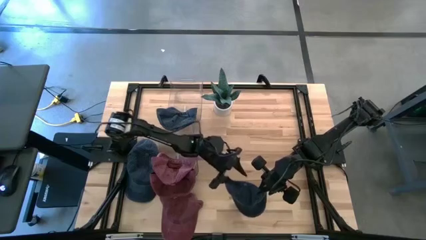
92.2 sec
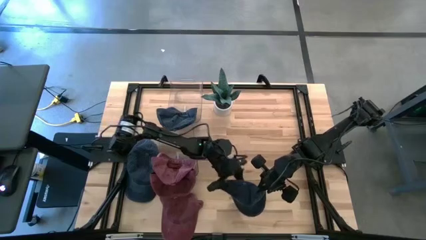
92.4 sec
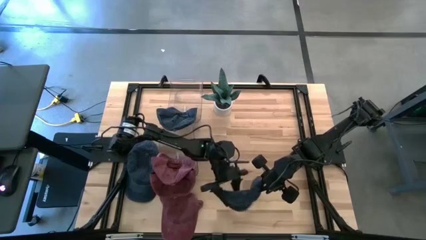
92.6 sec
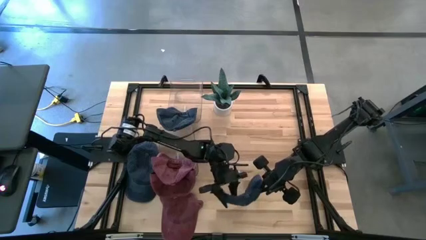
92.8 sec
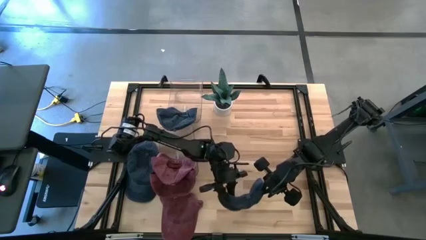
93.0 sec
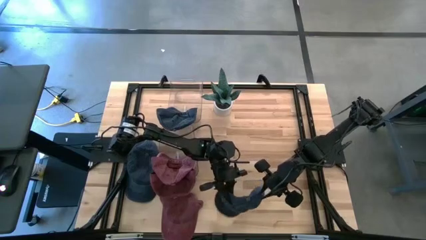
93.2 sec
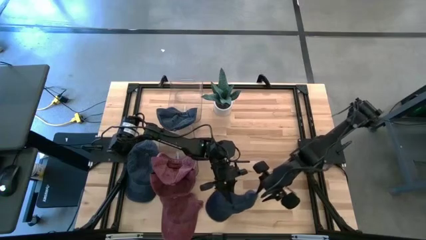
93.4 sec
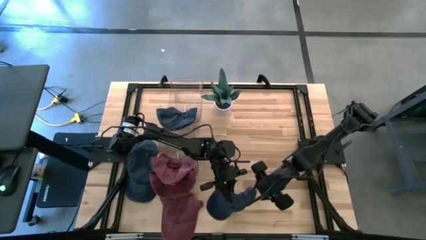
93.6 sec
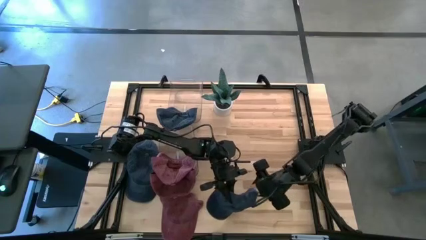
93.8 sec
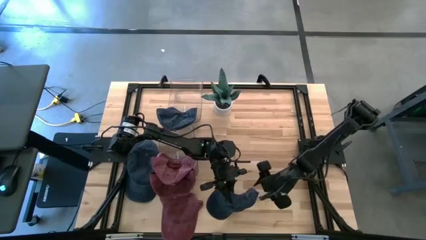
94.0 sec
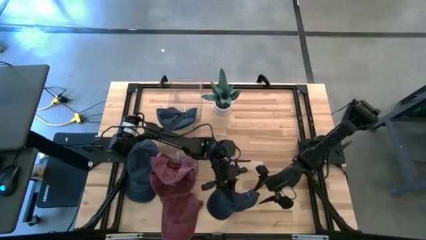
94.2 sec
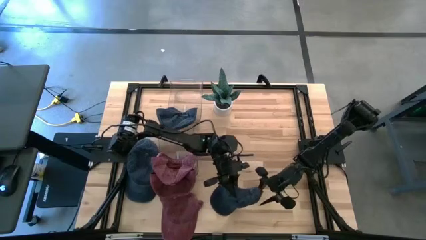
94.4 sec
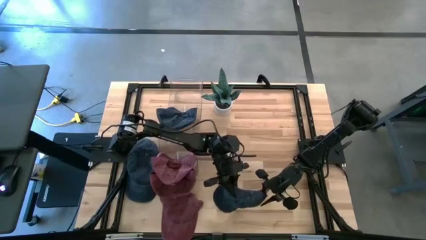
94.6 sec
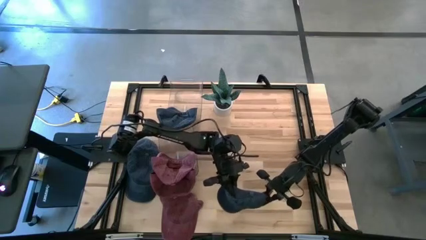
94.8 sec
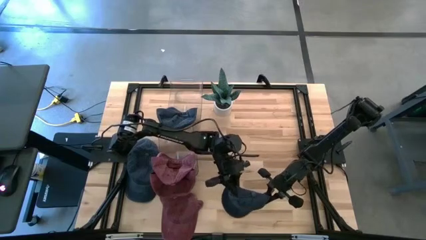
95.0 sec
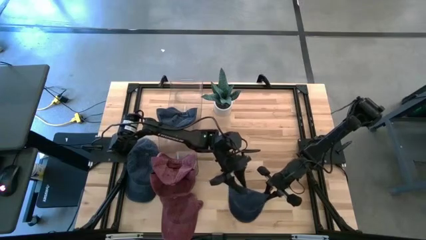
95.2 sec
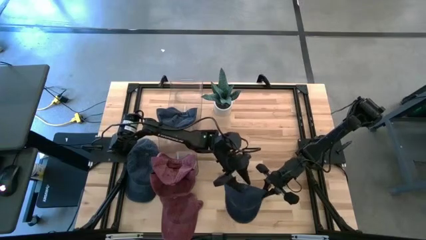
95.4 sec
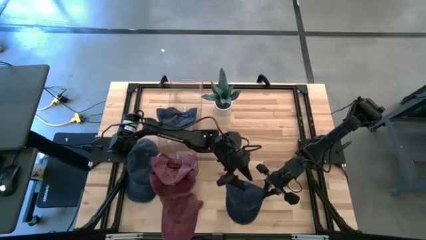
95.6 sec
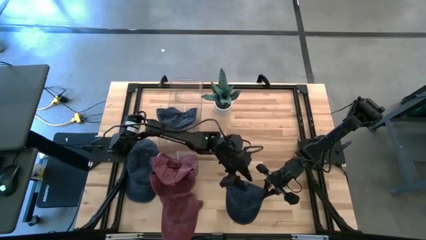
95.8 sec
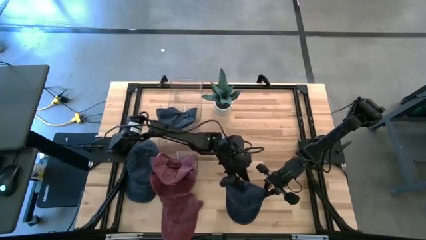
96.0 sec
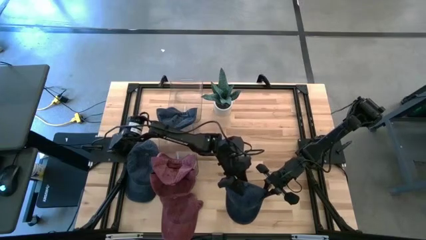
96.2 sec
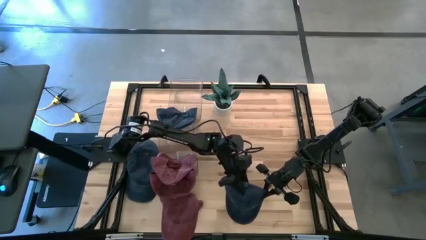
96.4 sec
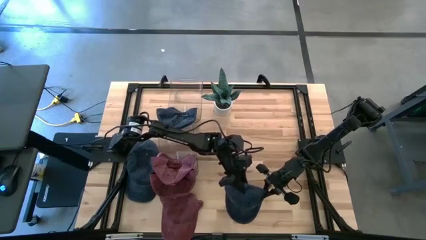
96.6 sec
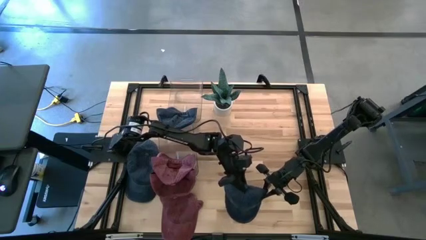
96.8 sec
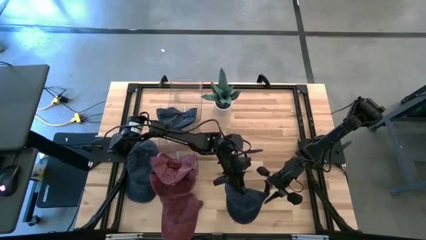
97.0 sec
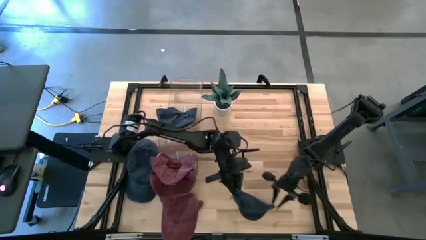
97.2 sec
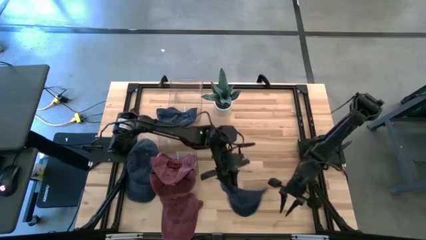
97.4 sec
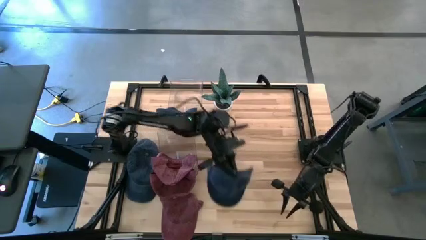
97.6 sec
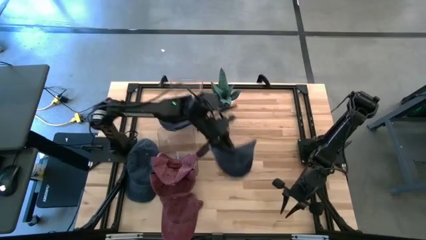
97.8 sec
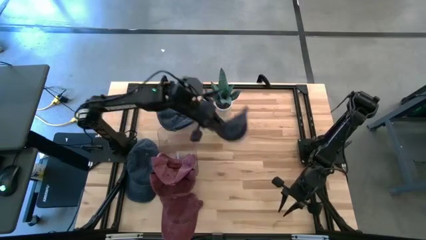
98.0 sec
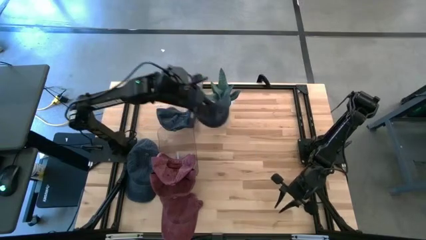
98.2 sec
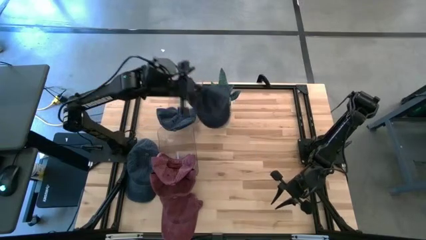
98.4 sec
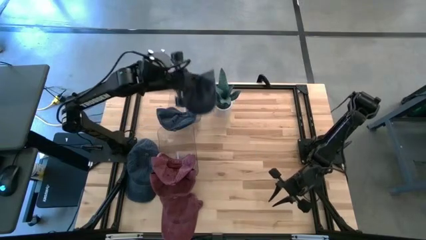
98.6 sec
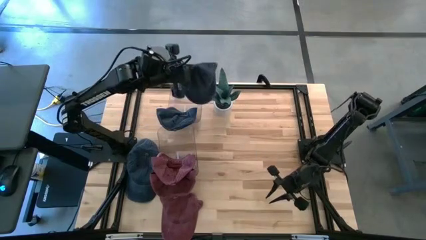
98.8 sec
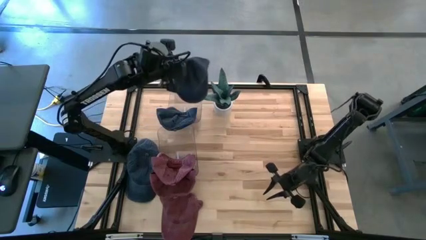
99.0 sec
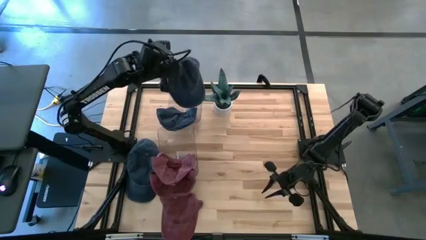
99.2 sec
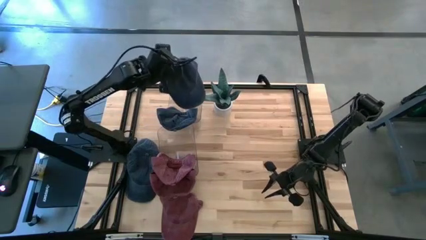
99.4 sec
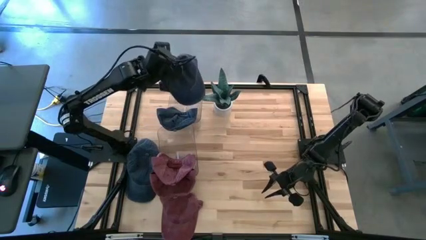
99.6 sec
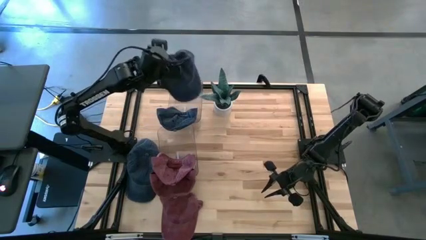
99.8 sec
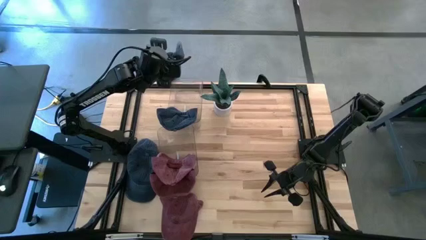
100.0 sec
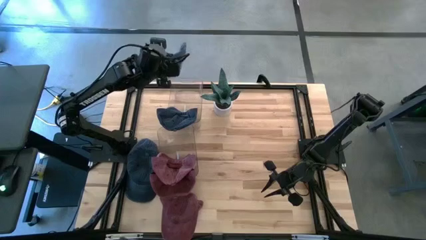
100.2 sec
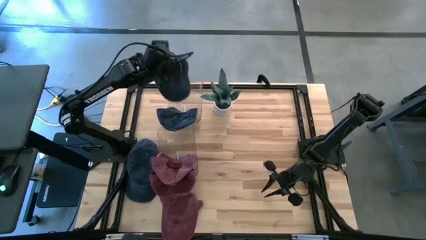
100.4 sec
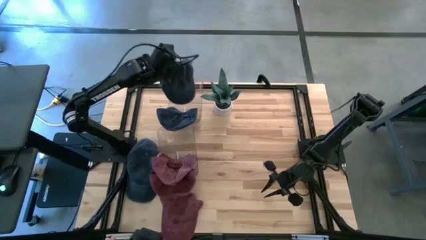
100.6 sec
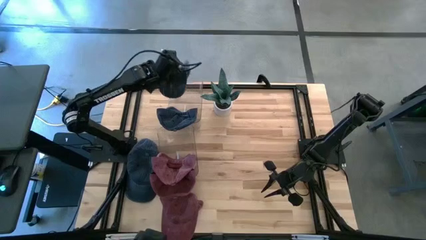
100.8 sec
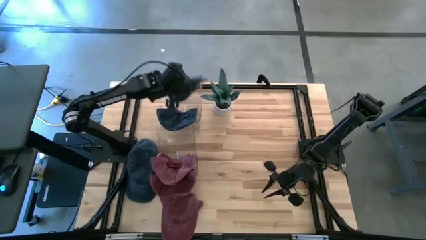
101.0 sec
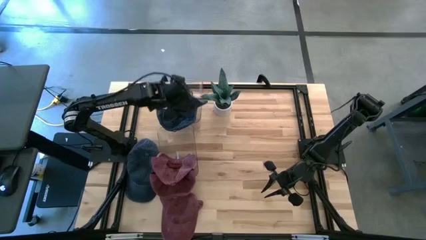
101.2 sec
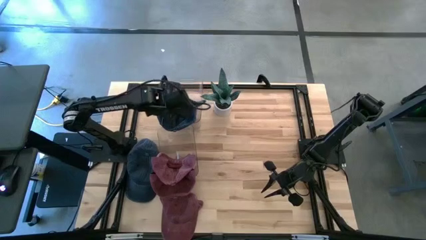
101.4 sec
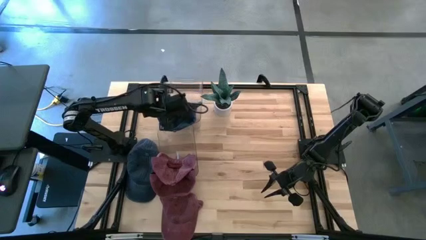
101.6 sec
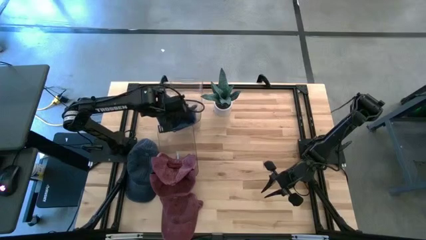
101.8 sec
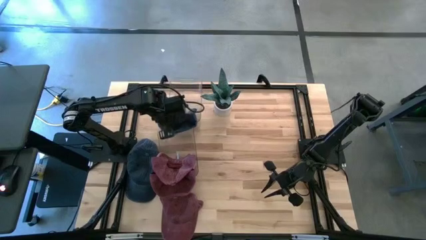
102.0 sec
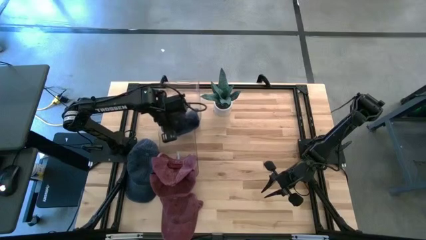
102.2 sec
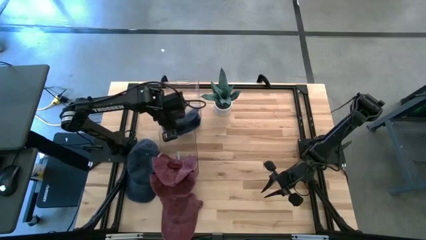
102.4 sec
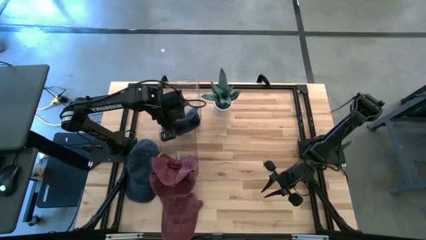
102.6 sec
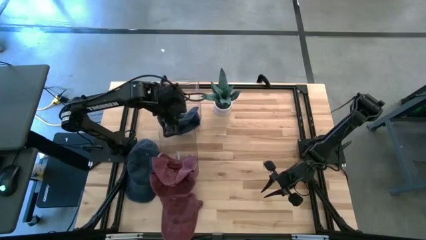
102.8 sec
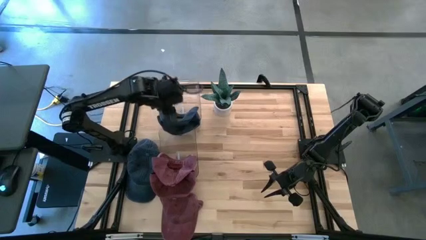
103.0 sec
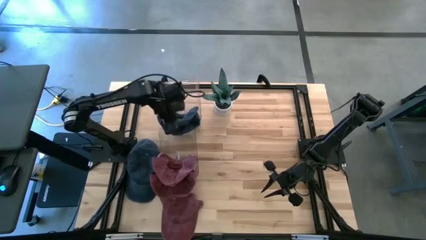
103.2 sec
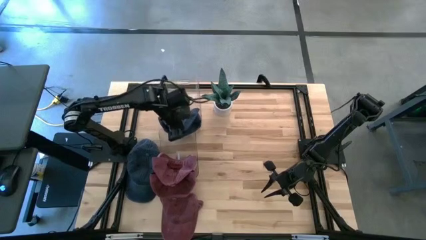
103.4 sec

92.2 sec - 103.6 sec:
Task: Pick & Place hat
Put the right blue cap into the top transparent bin

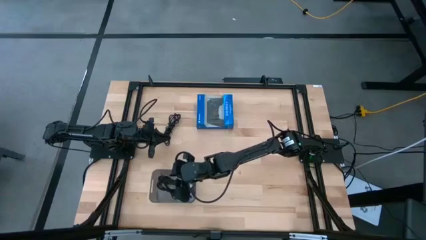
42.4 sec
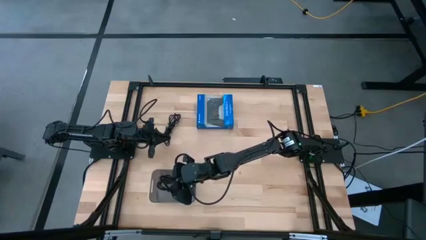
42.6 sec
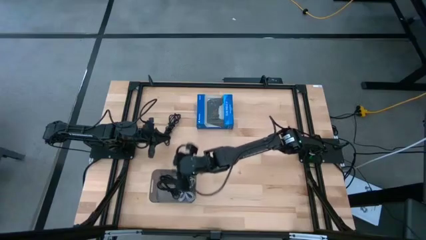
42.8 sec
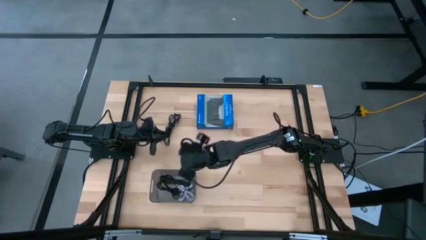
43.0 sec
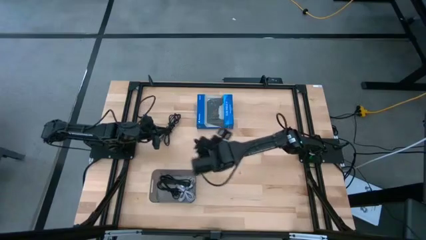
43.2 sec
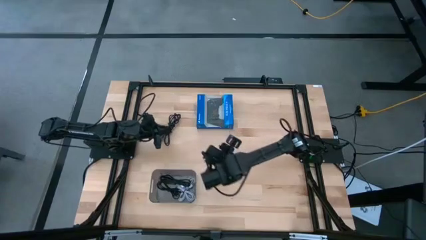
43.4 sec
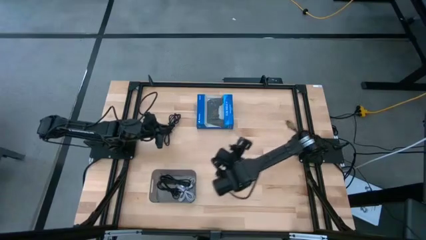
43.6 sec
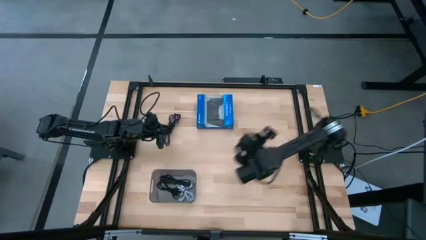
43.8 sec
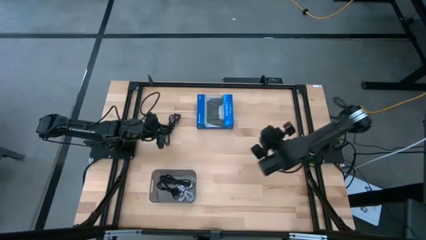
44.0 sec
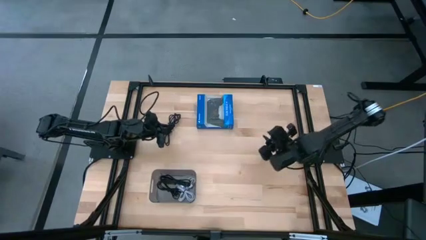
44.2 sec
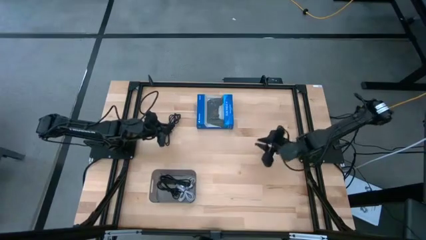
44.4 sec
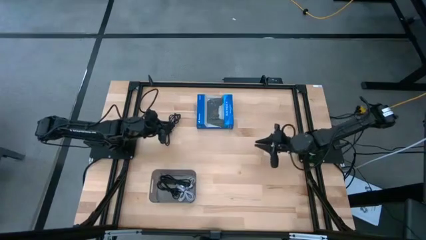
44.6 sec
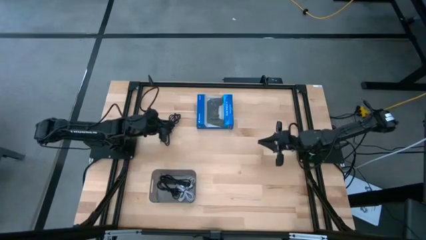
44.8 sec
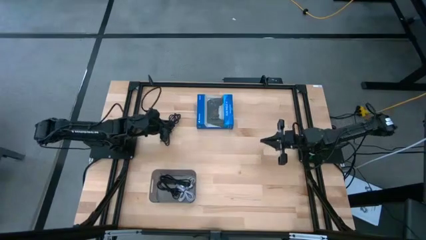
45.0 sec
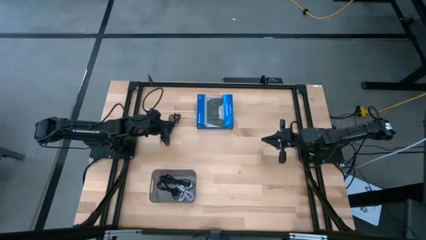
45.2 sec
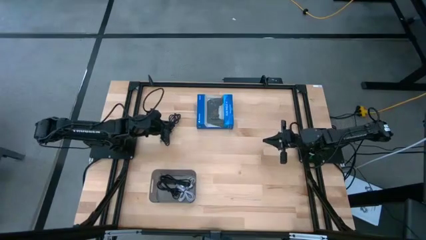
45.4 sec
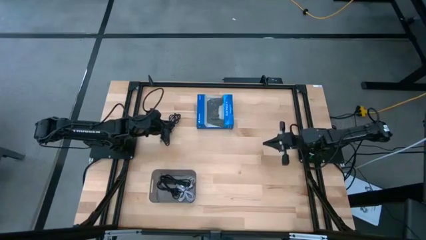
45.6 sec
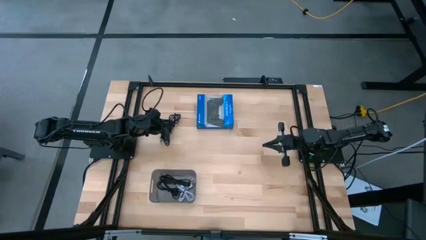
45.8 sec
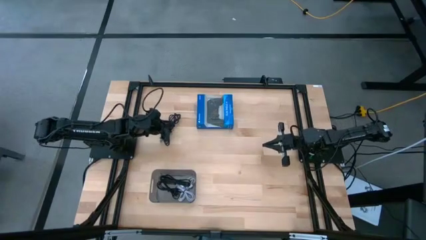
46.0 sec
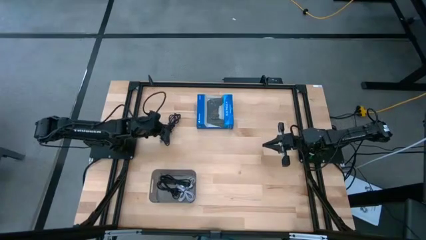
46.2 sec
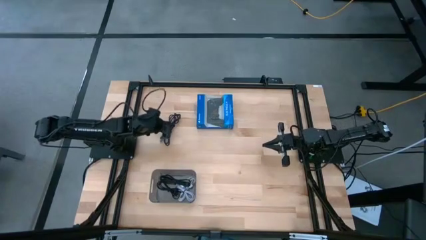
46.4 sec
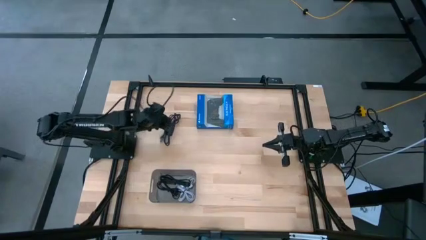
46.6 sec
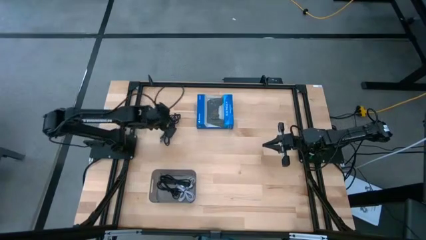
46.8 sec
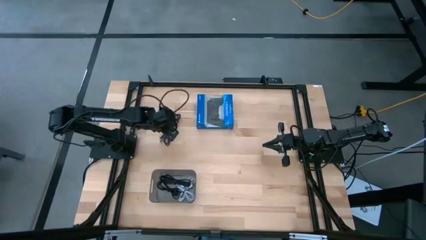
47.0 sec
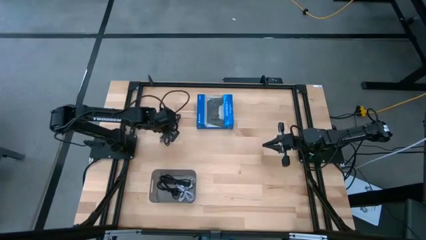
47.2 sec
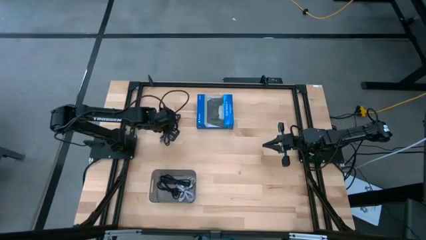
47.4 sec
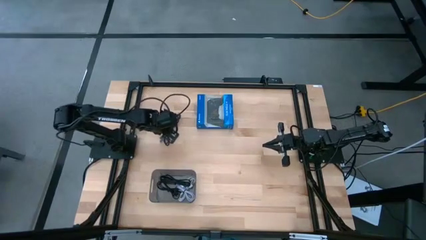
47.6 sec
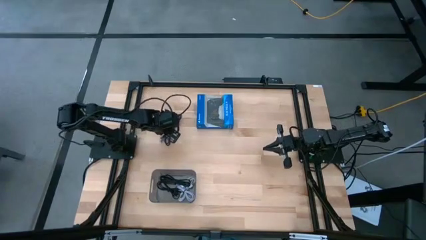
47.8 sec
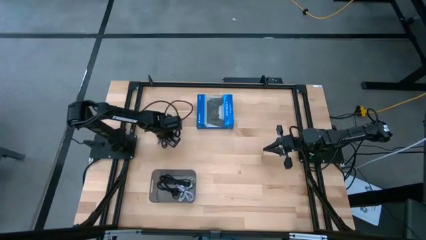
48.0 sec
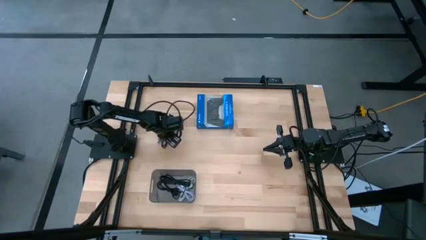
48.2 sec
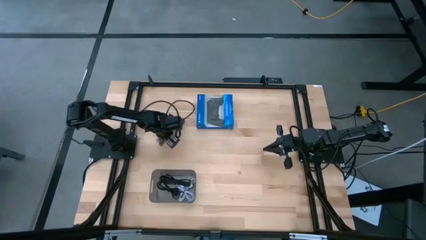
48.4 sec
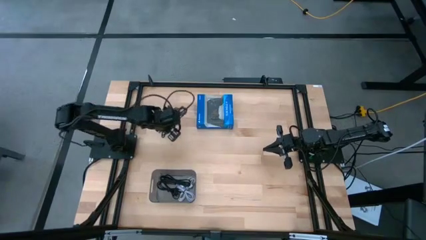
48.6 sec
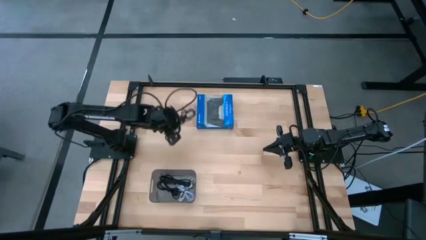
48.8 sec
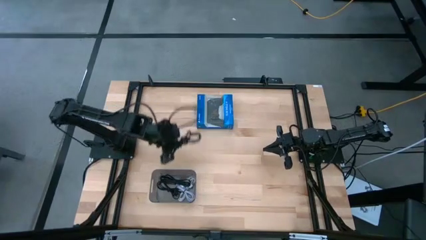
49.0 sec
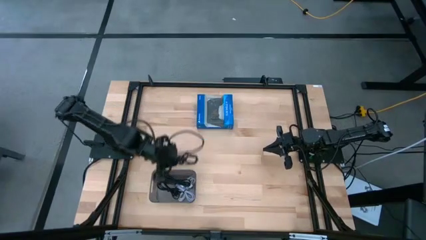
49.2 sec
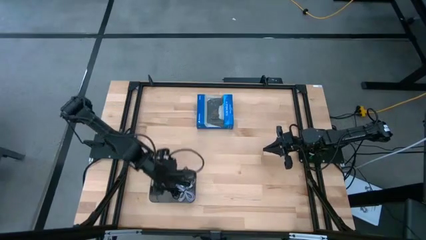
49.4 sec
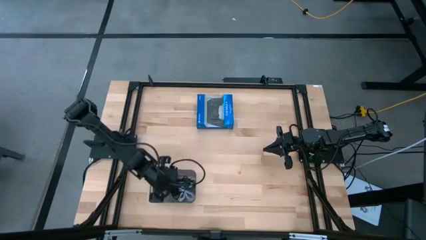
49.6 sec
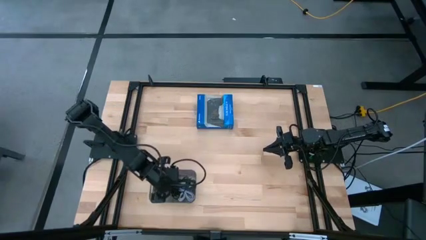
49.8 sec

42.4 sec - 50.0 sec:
Task: Pick and place USB-C Cables
Put the black charger cable into the black bin
